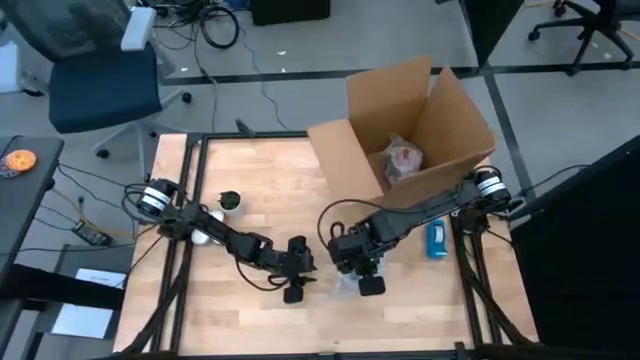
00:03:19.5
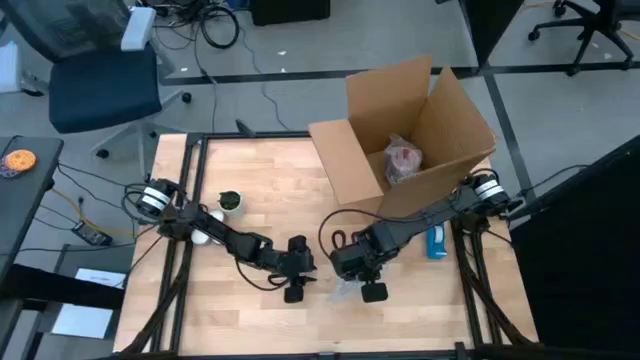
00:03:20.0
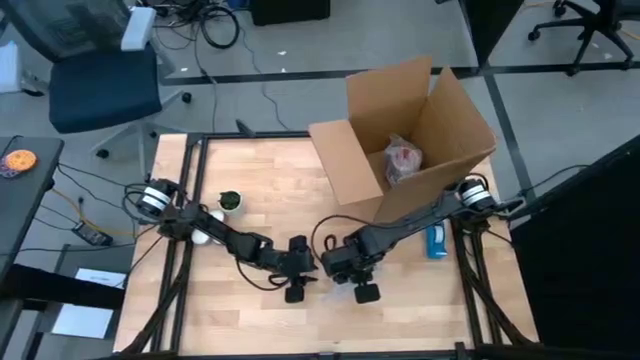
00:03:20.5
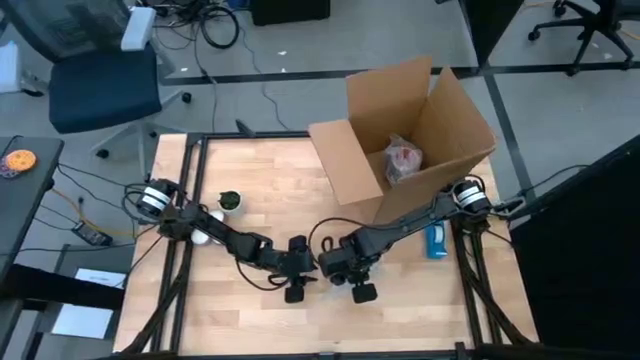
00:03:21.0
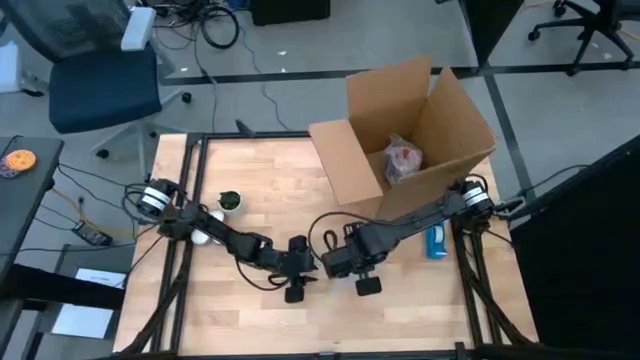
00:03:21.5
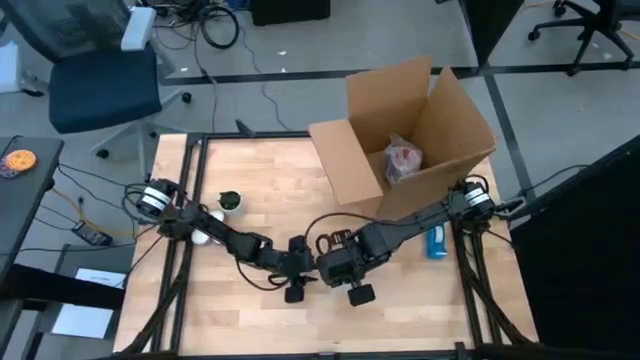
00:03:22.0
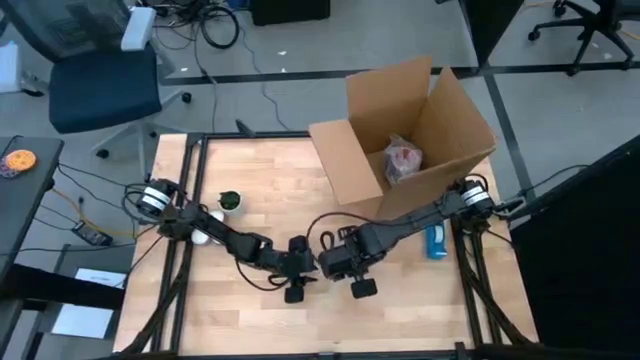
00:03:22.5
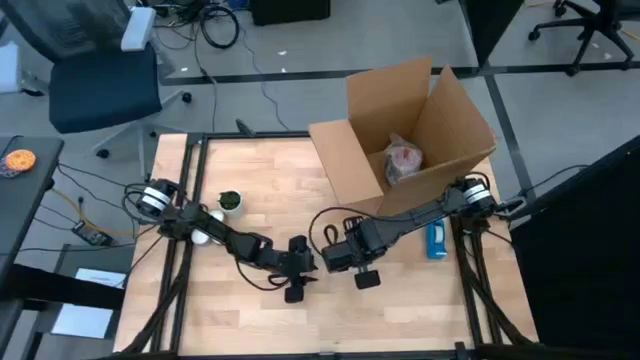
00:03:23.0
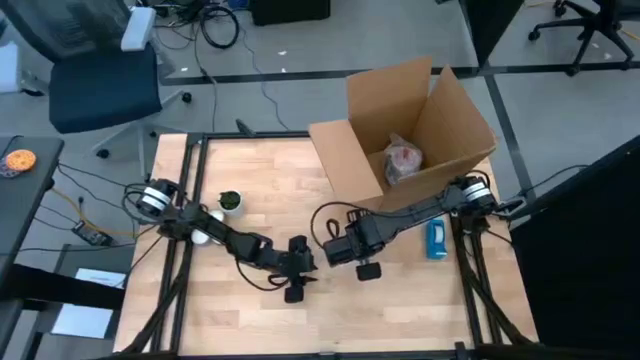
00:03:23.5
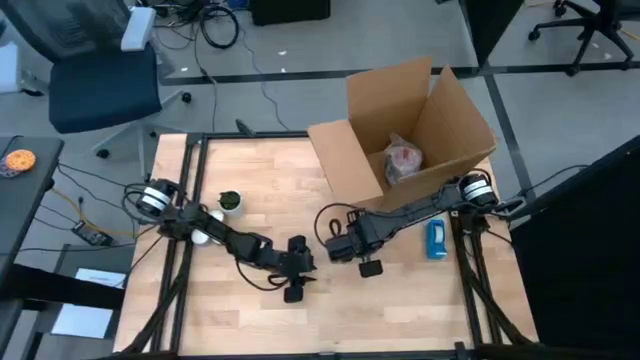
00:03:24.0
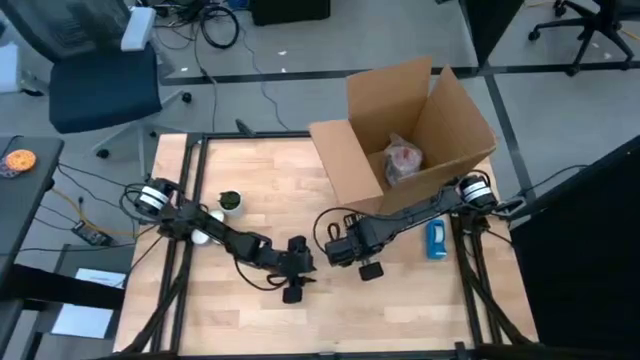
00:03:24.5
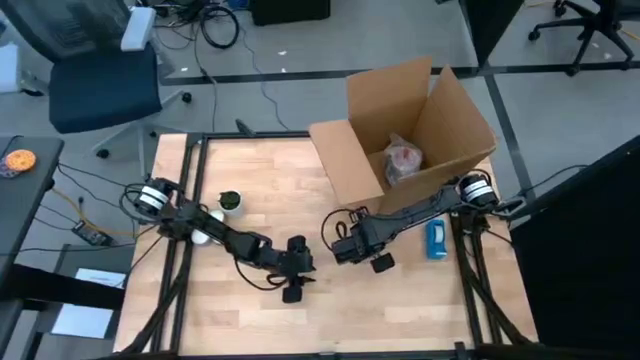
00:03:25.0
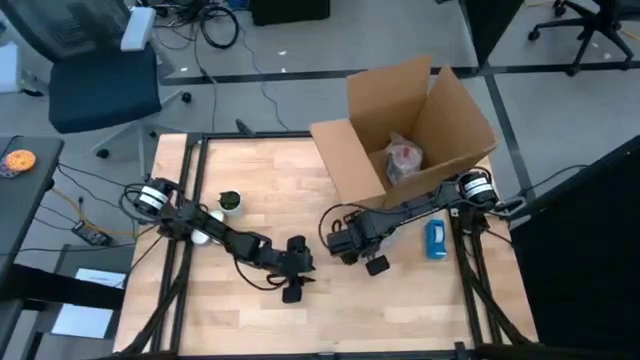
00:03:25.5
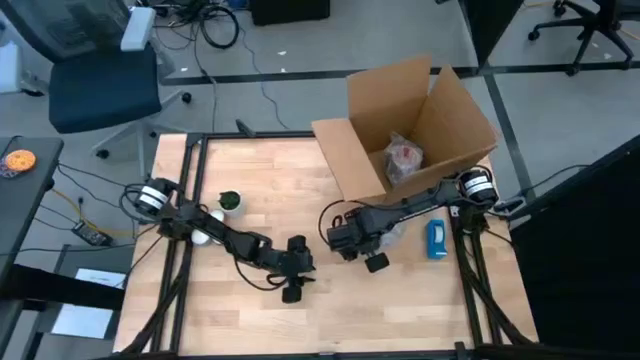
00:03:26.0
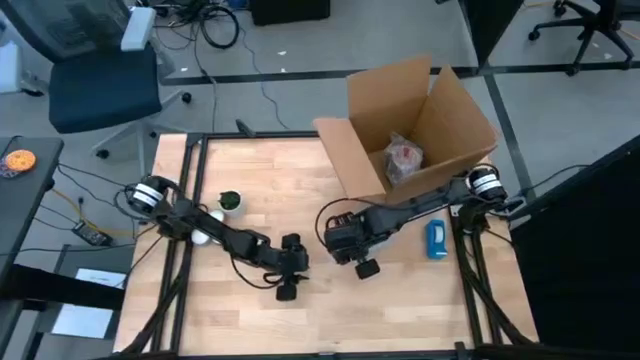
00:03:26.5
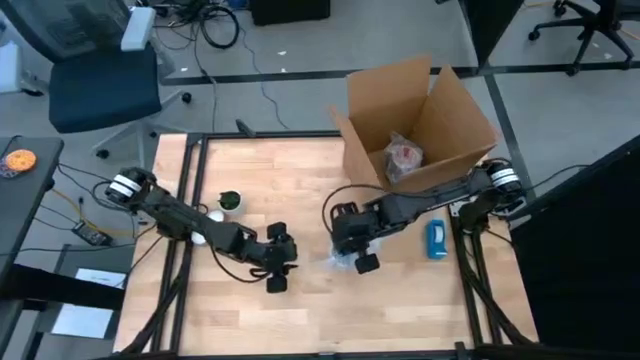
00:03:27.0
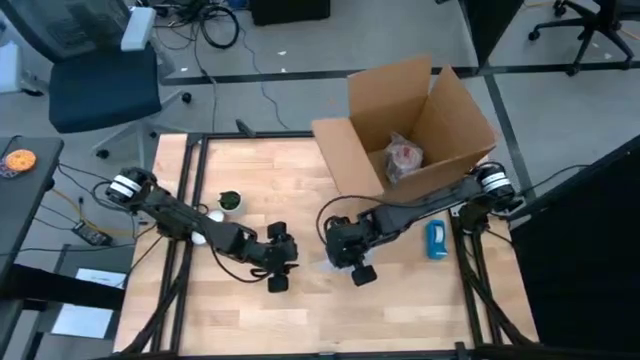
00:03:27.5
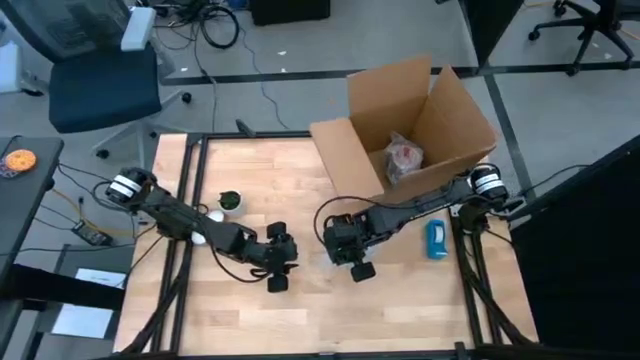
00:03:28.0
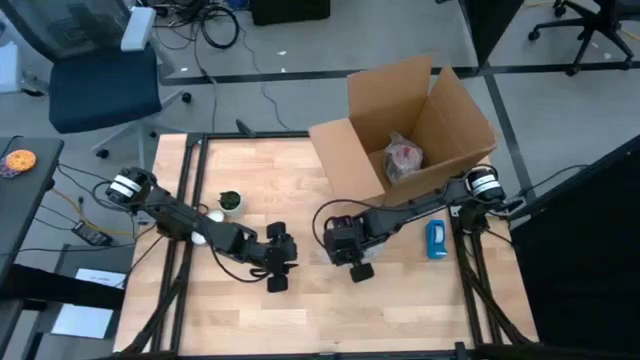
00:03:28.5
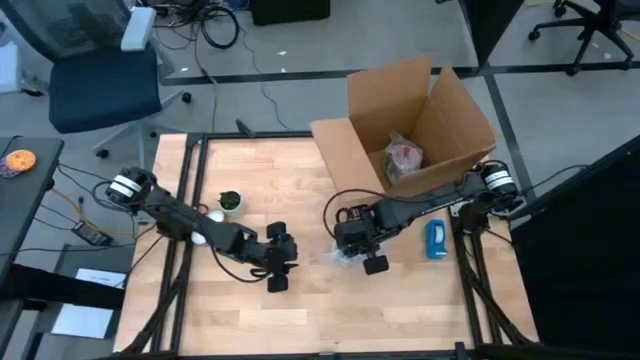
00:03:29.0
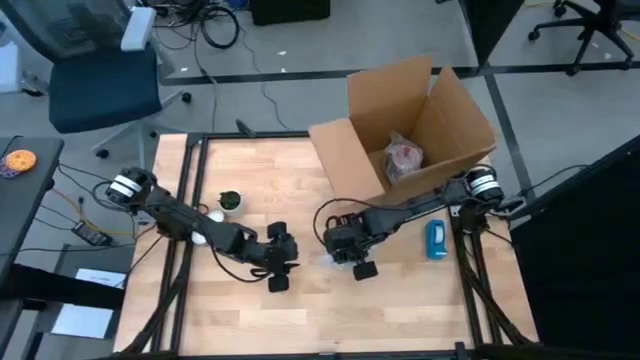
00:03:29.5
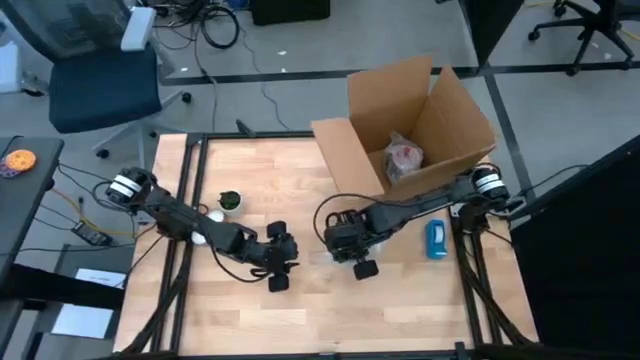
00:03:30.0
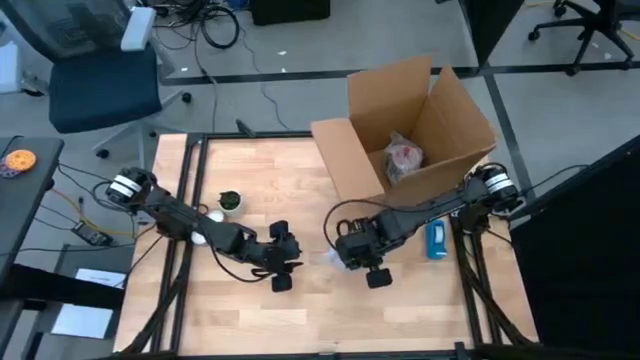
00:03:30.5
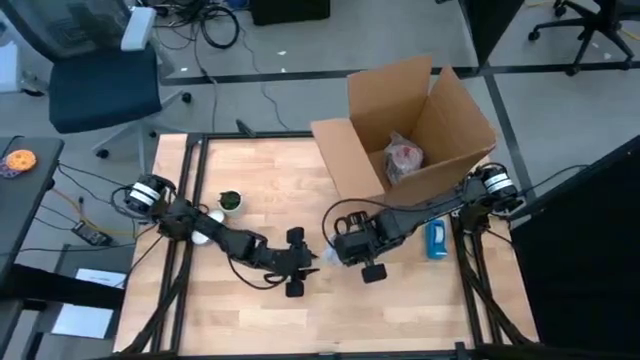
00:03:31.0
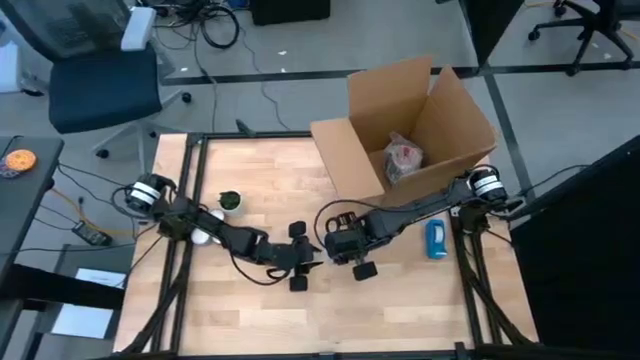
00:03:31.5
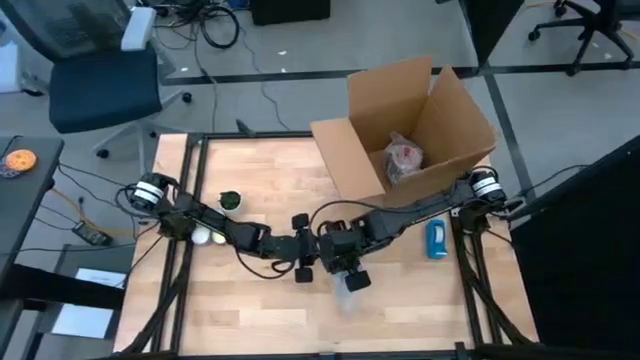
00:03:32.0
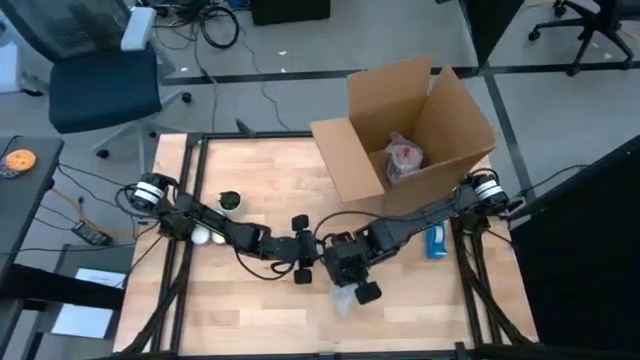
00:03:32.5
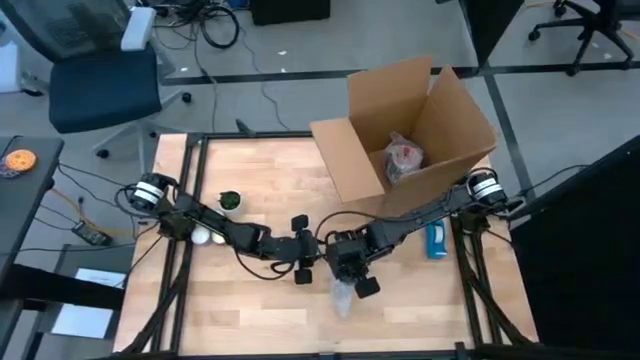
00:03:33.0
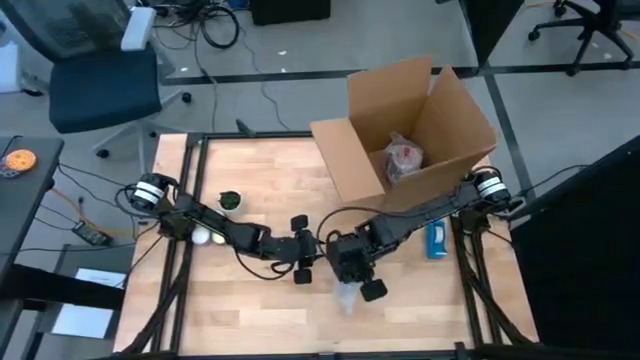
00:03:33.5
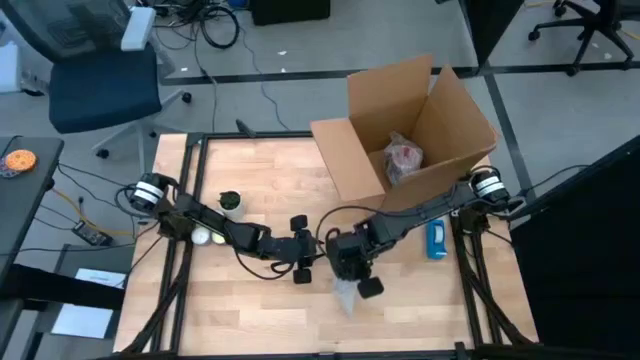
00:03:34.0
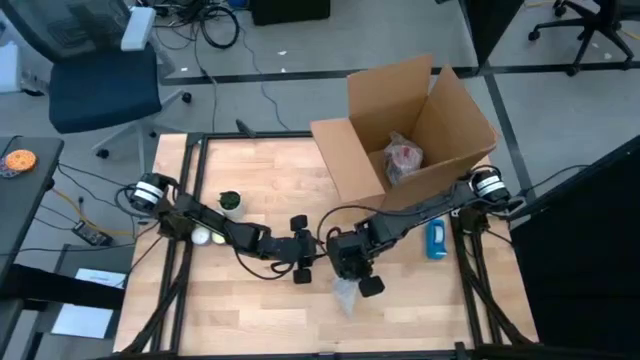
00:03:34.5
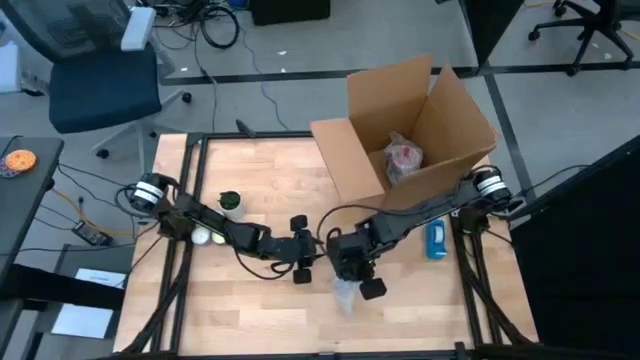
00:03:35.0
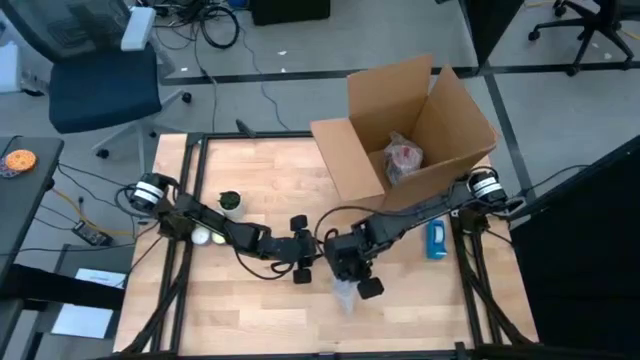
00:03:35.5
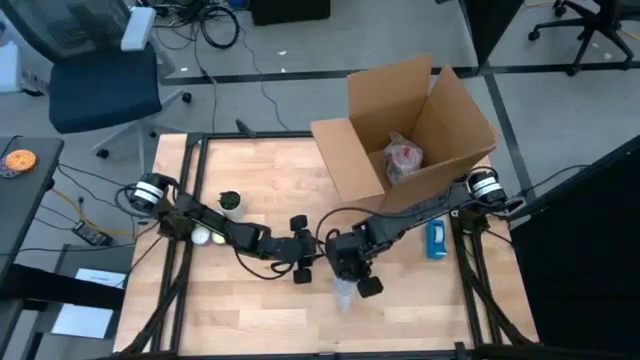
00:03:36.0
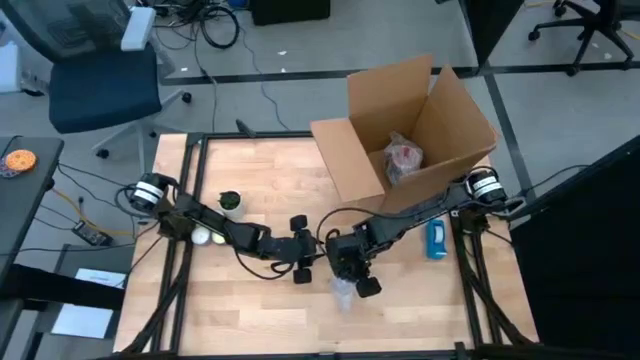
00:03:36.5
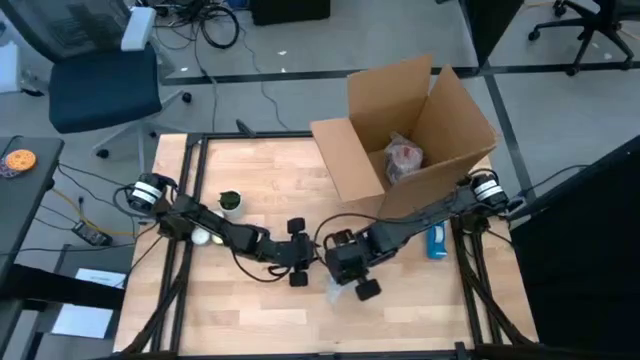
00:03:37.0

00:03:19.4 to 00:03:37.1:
Task: wrap mug
Wrap the blue mug with bubble wrap

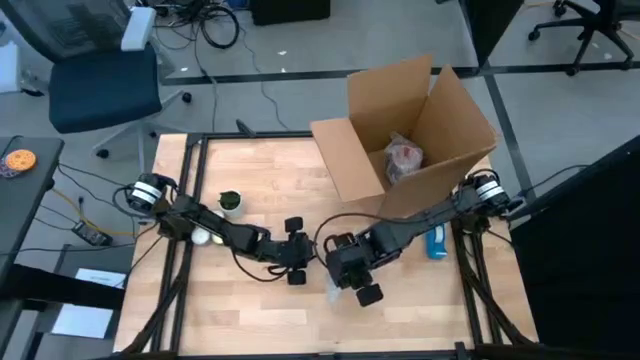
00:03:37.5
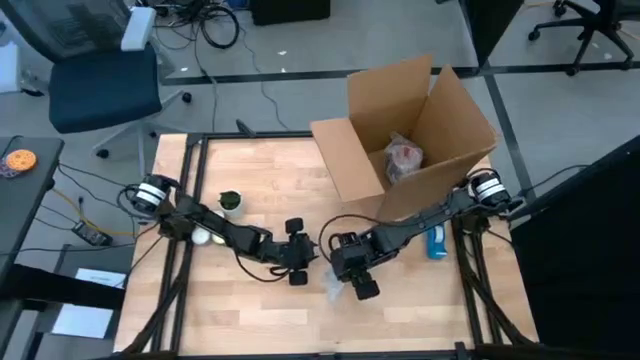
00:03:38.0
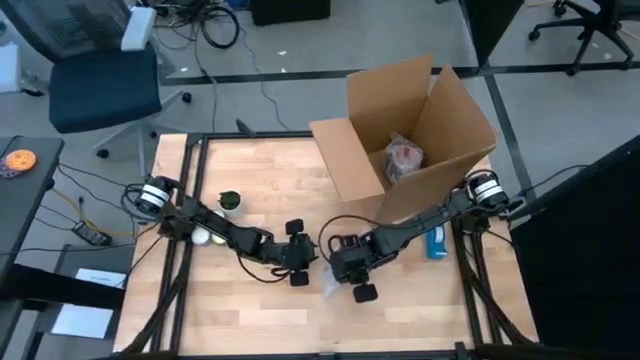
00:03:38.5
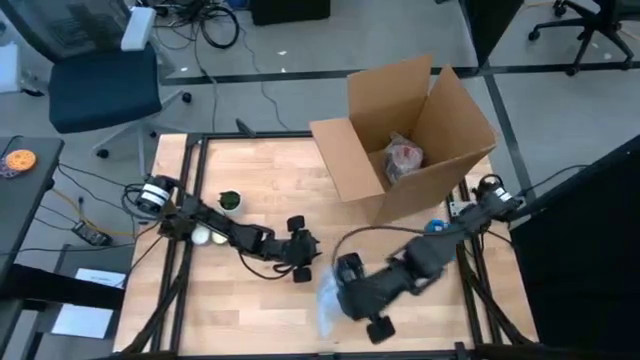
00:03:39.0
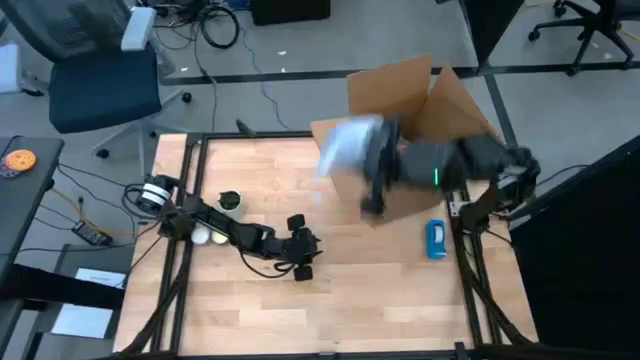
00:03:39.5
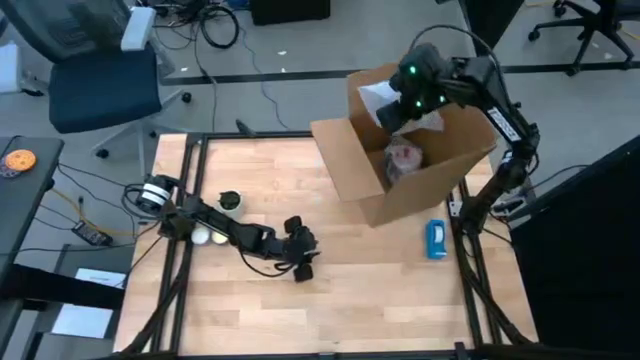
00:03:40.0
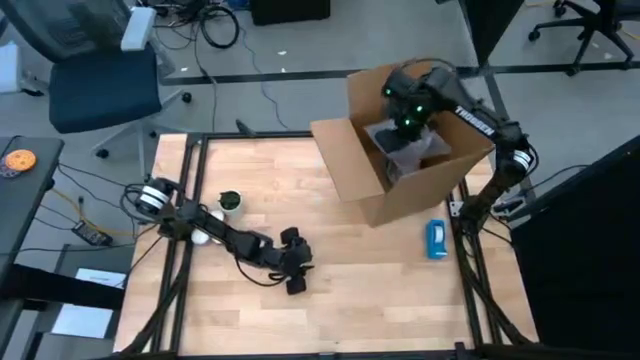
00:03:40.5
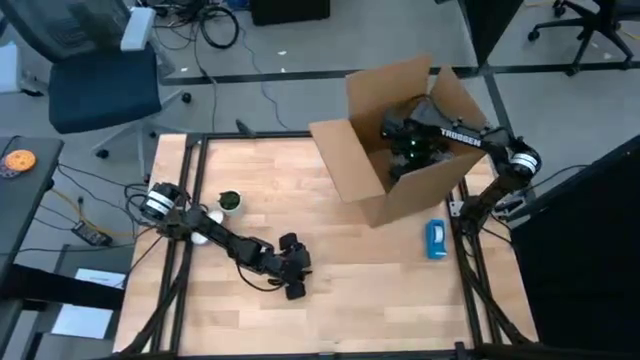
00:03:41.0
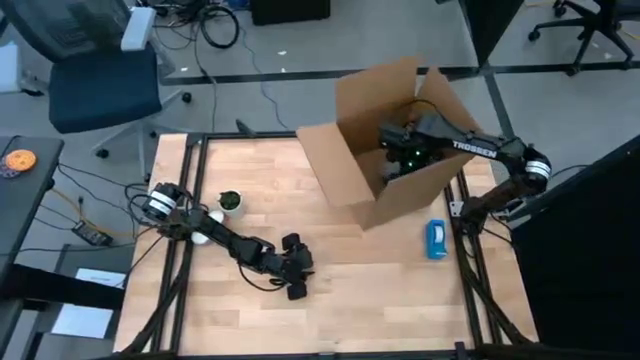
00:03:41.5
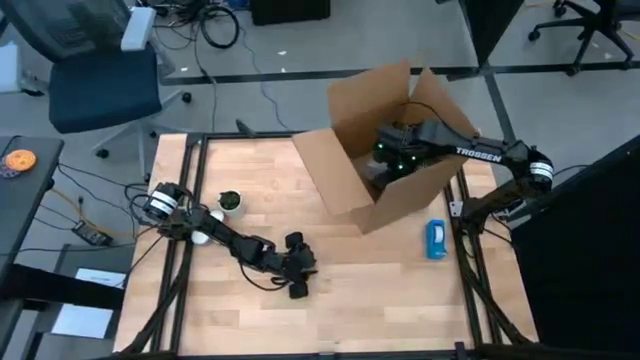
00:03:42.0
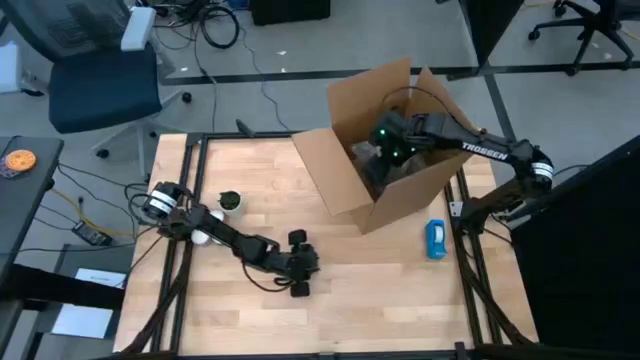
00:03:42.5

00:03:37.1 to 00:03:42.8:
Put the wrapped blue mug into the cardboard box
